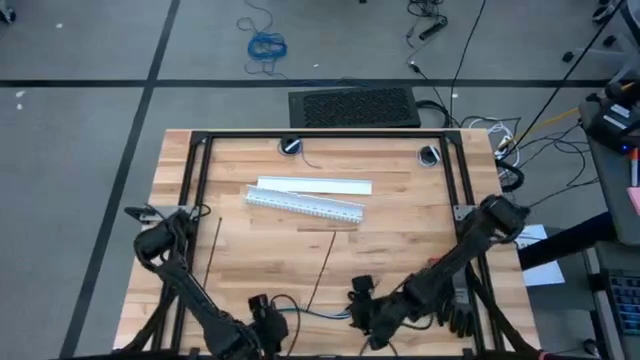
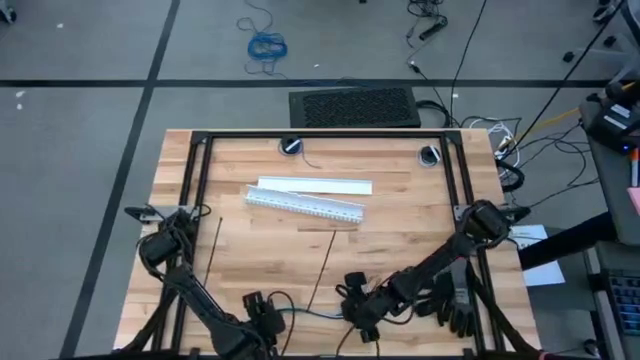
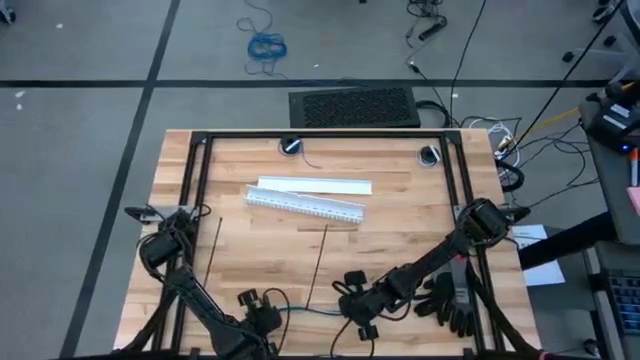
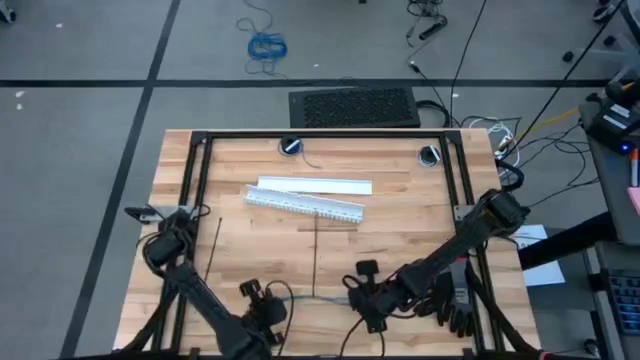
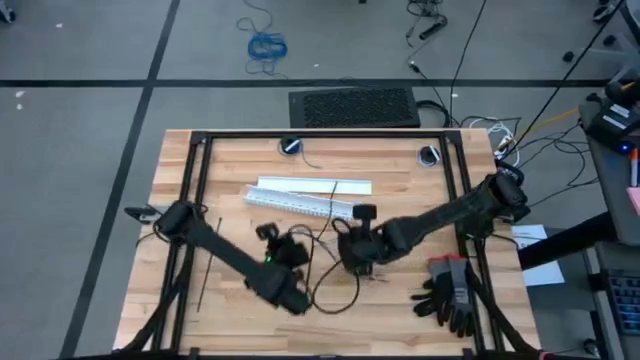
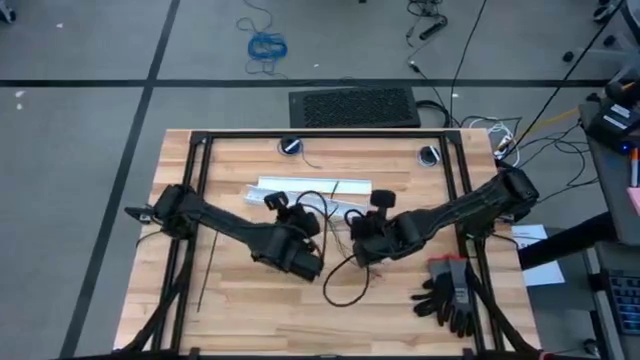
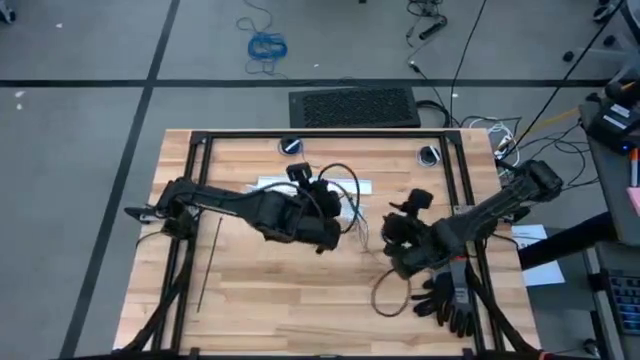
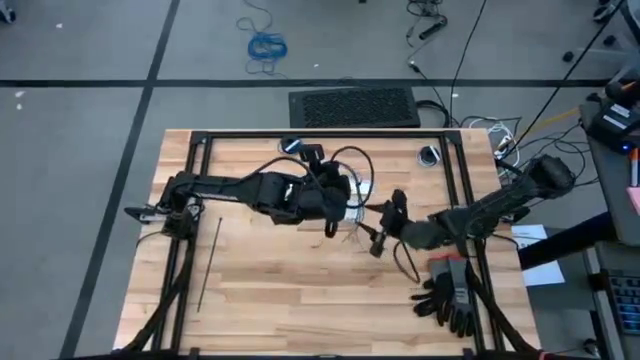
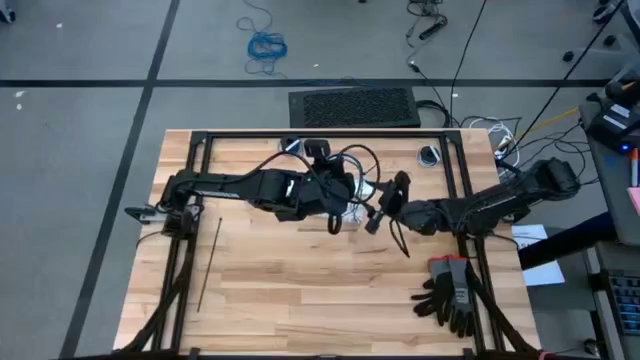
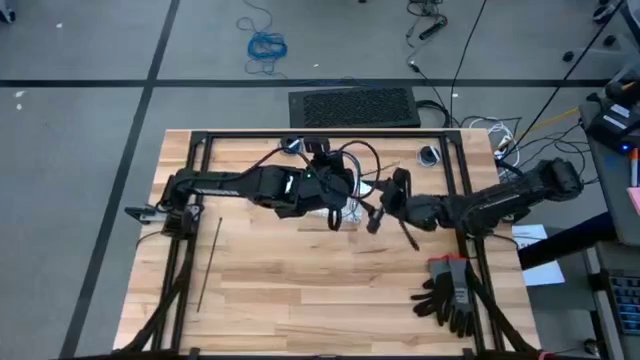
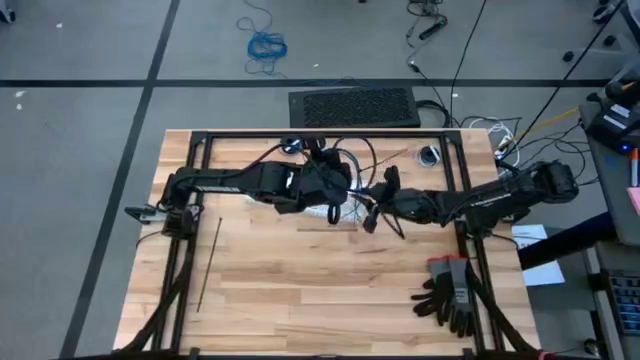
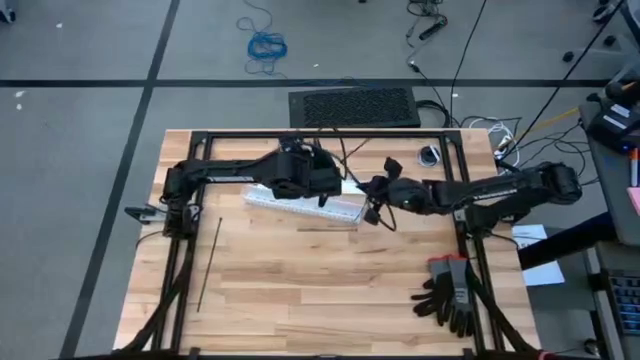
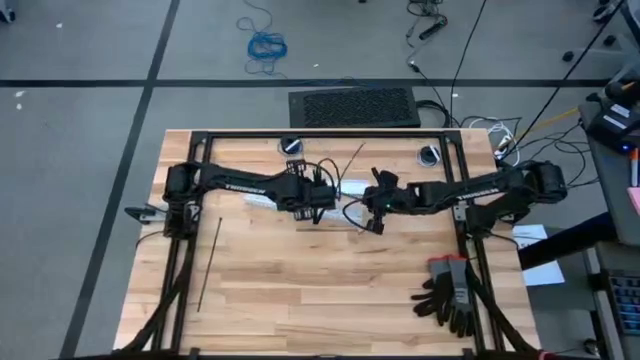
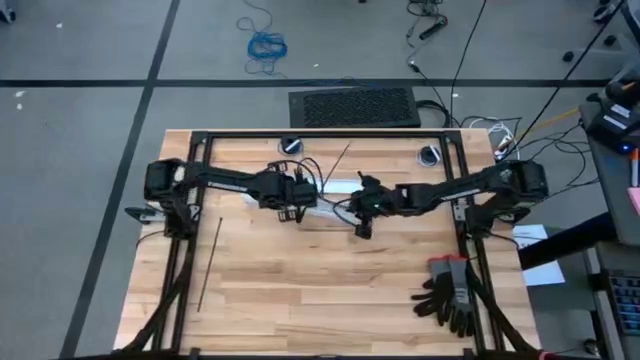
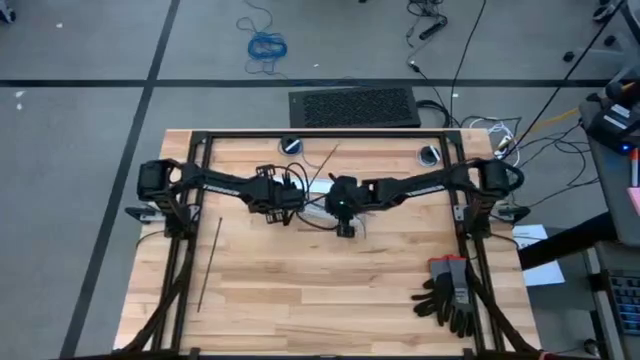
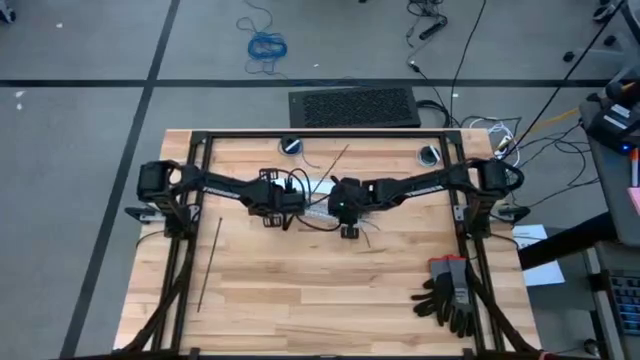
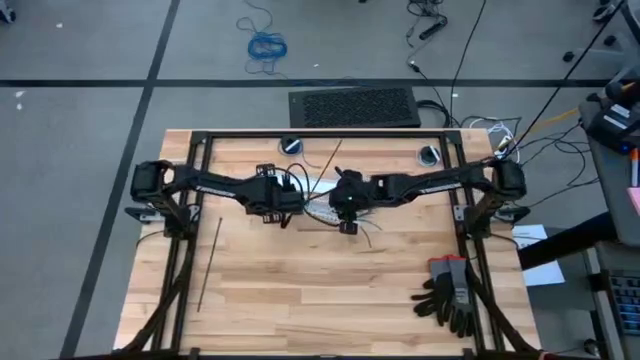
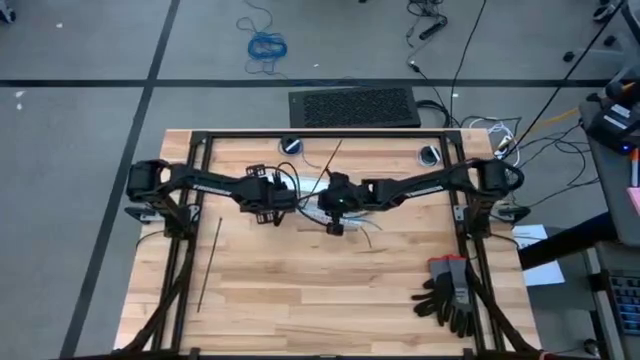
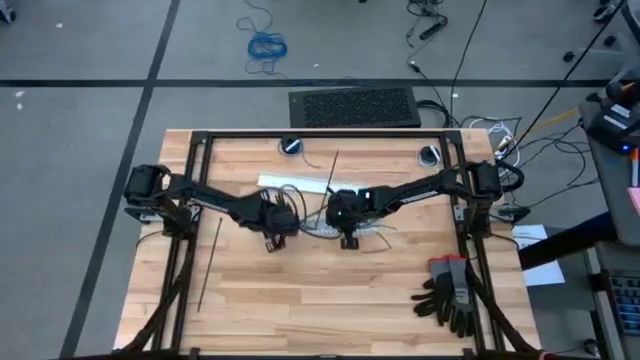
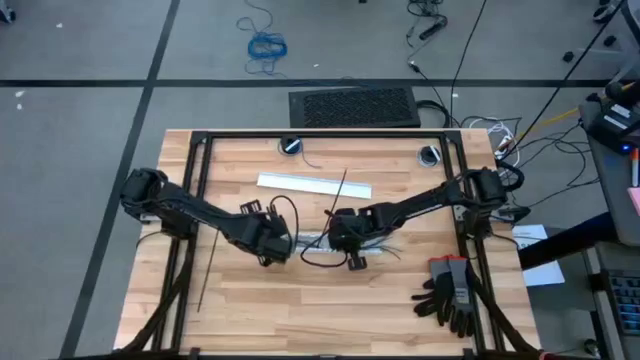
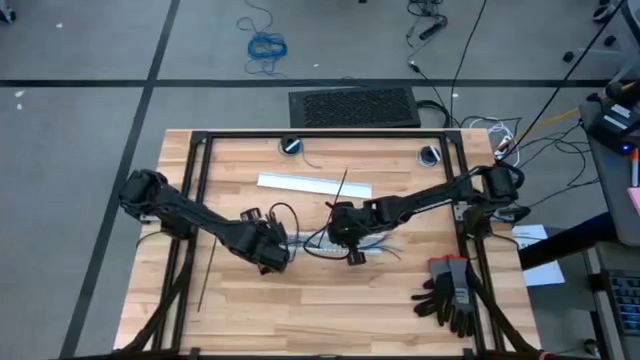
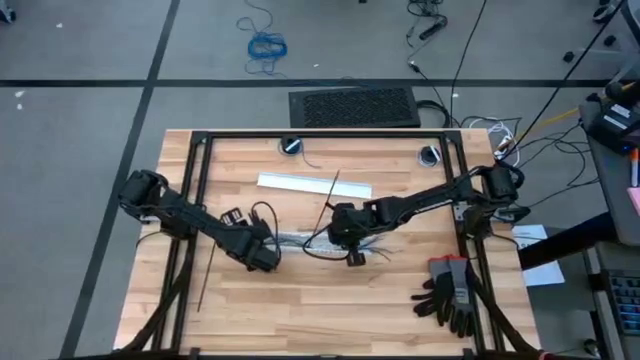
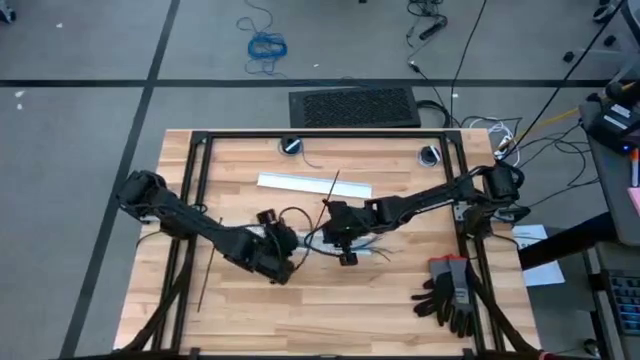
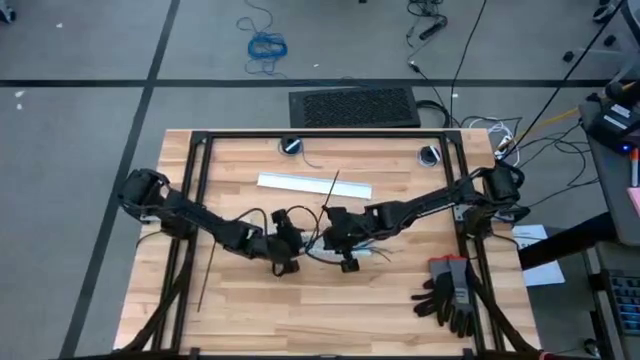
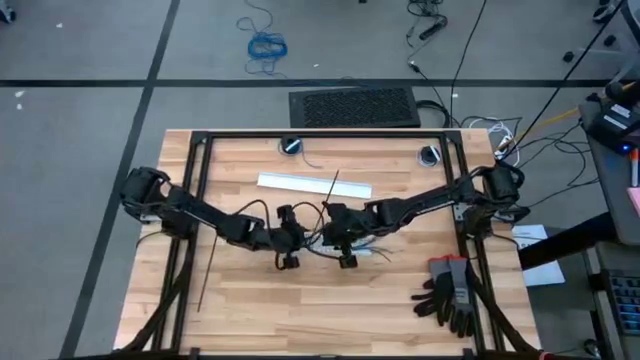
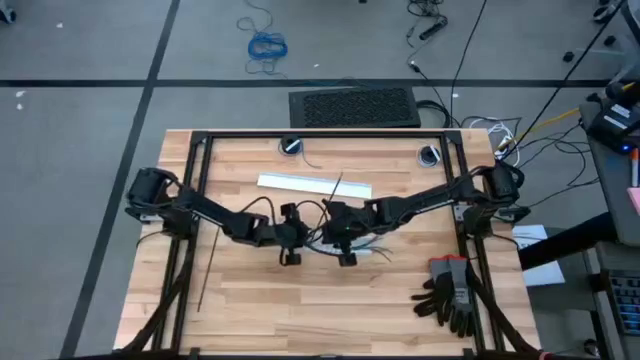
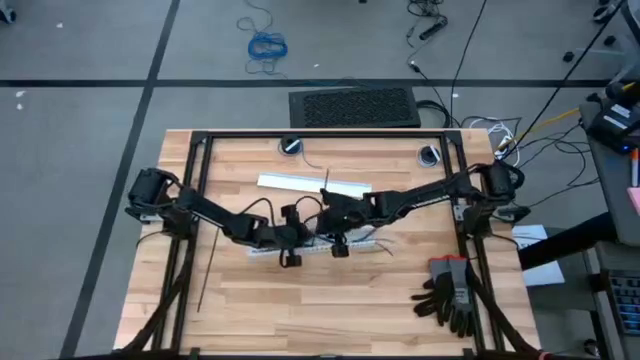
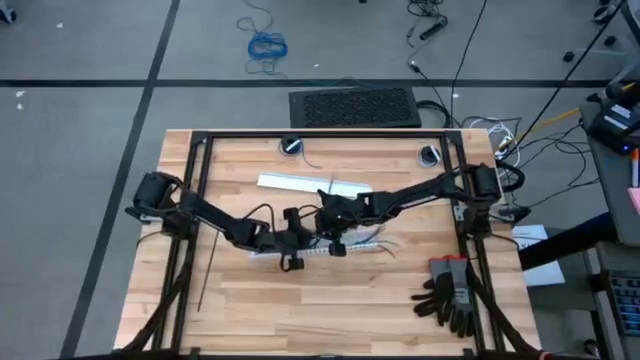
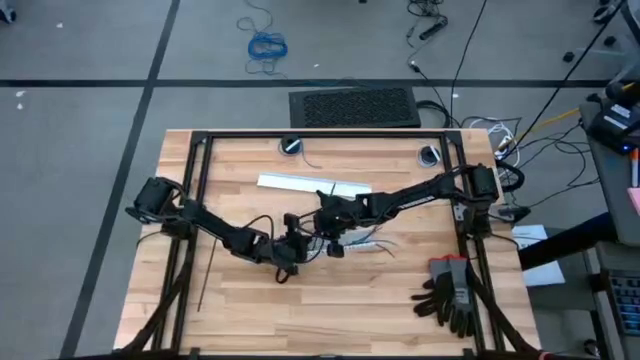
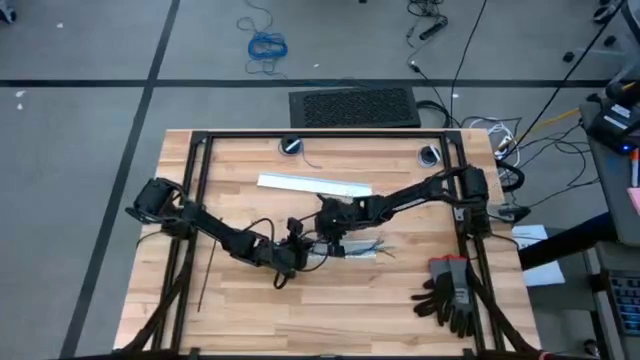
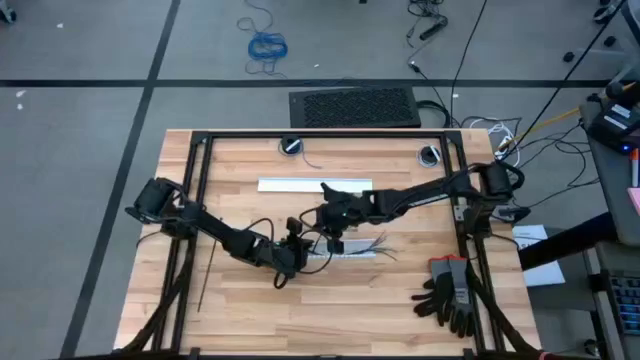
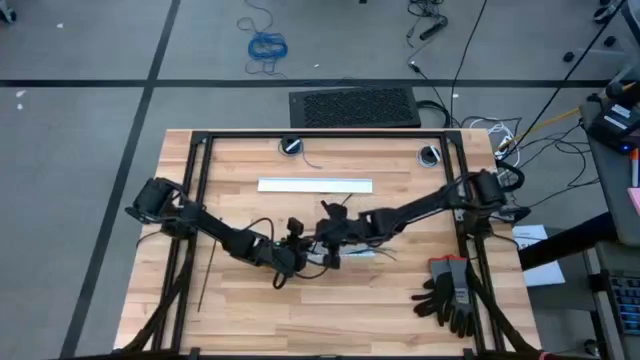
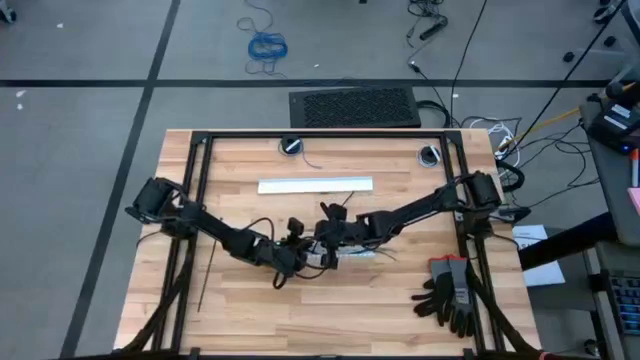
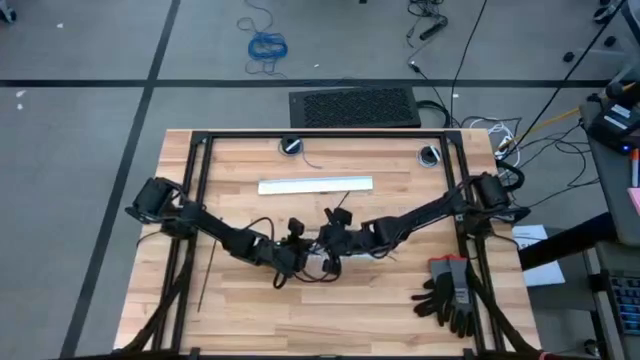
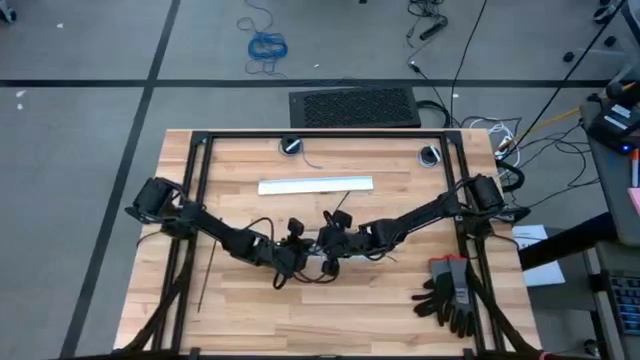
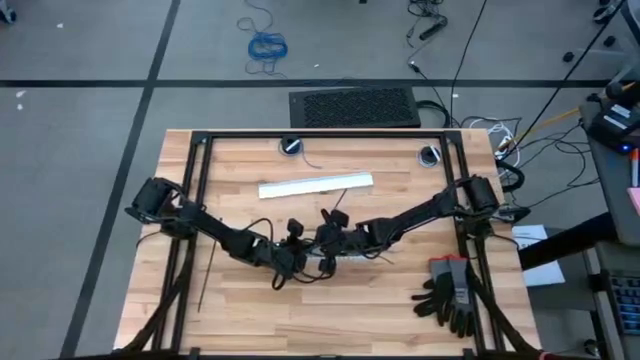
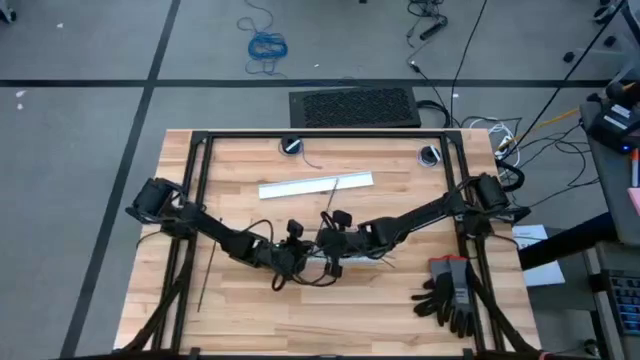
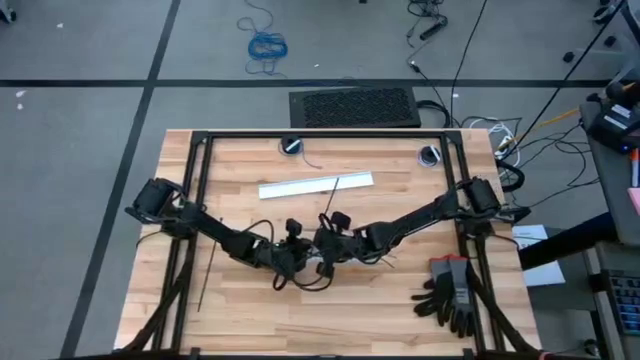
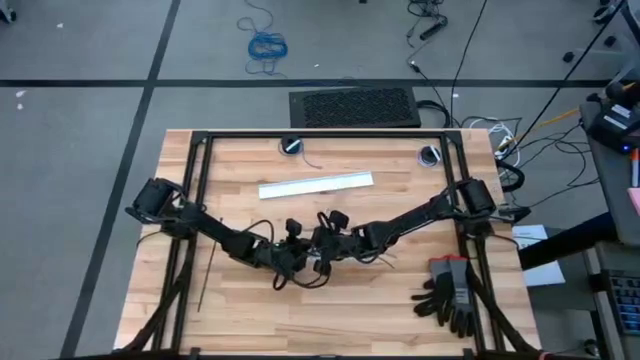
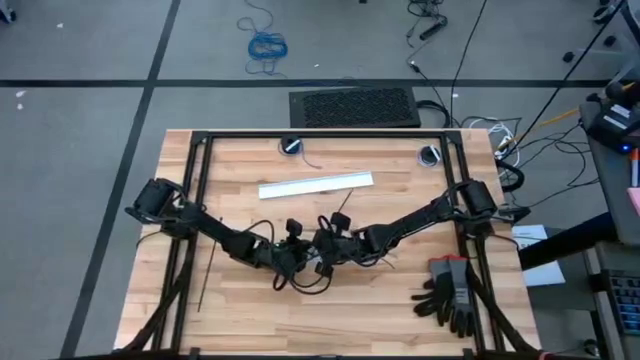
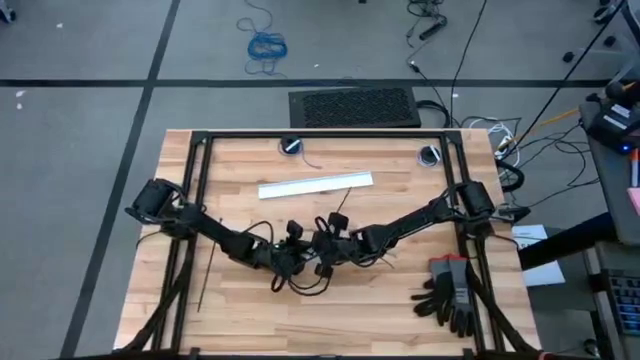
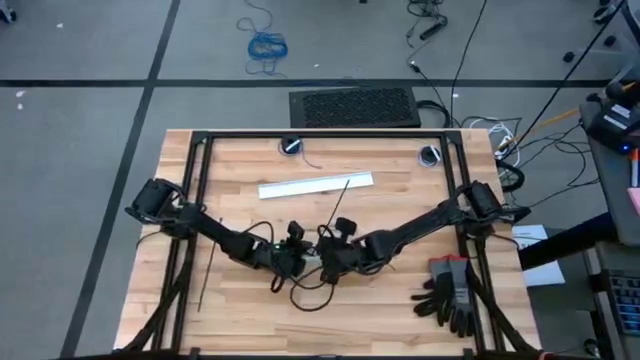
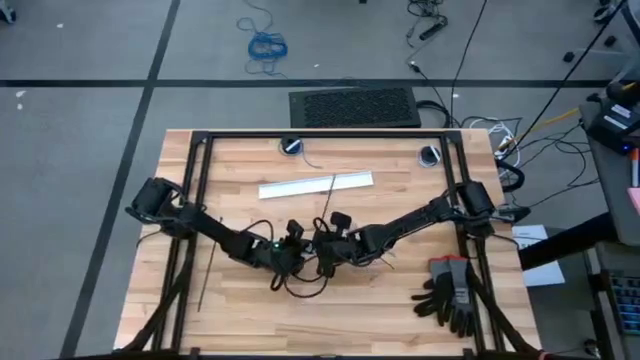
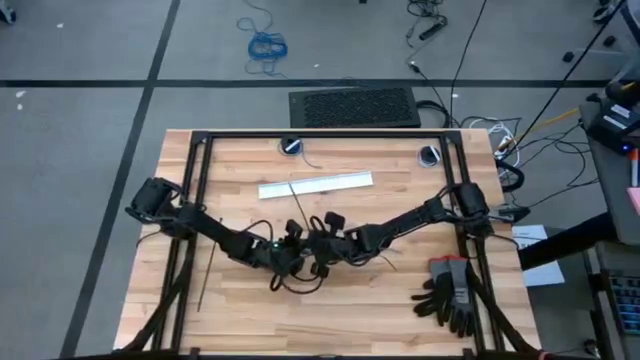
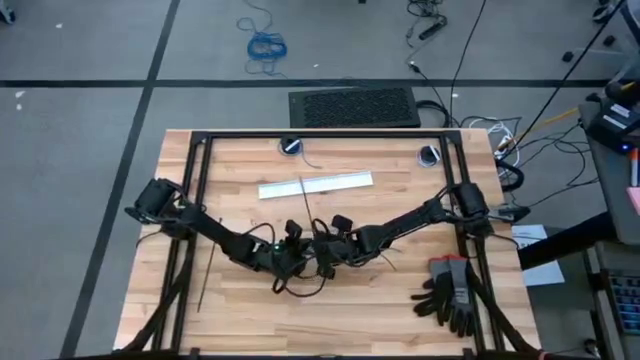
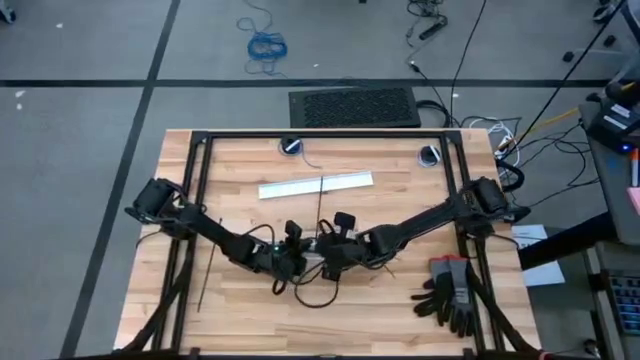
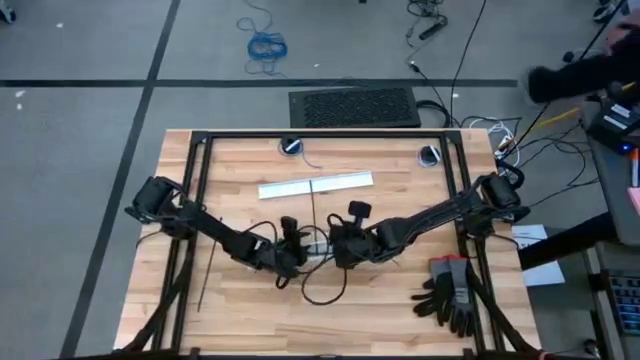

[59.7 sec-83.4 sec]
Task: Ziptie cables
Put the cable wire into the cable duct
